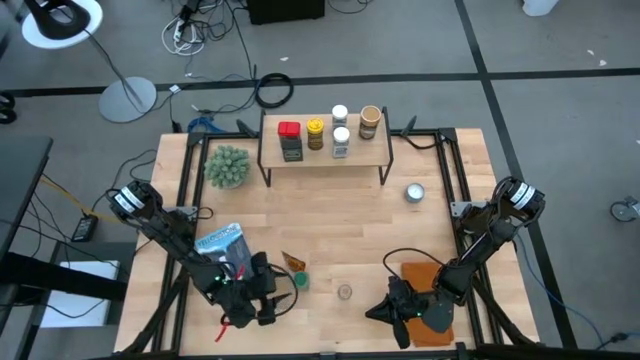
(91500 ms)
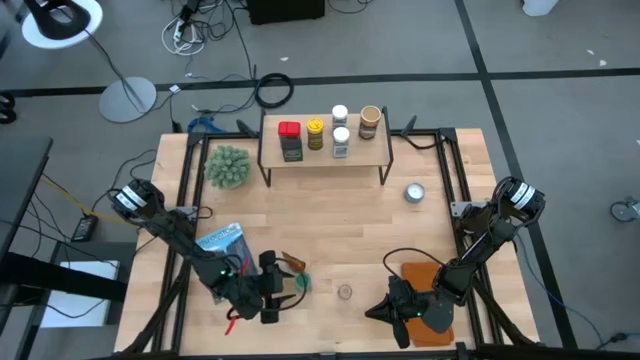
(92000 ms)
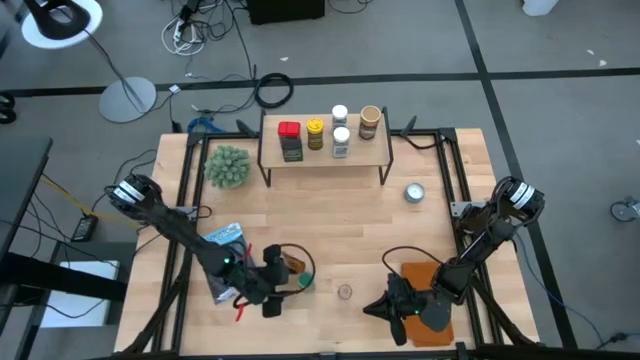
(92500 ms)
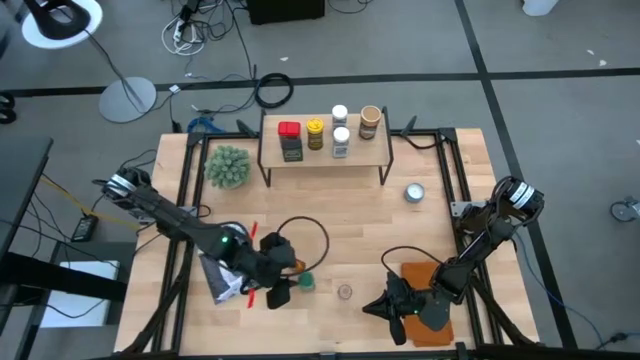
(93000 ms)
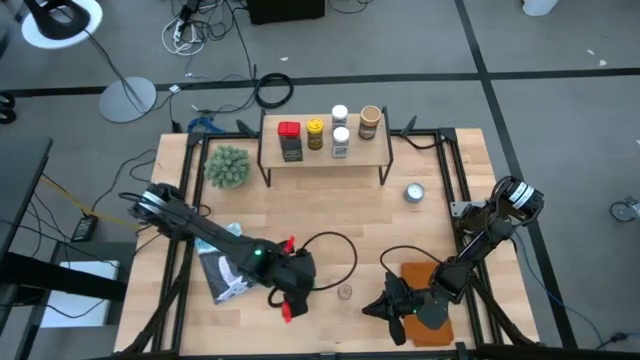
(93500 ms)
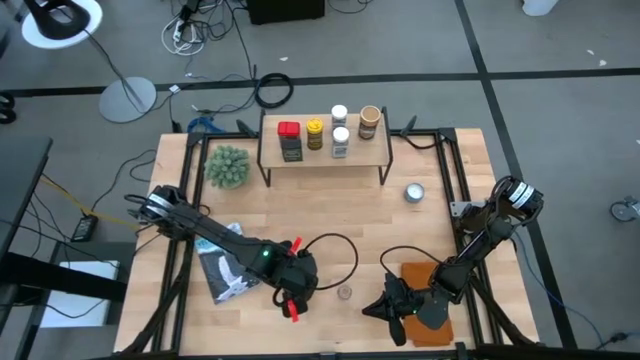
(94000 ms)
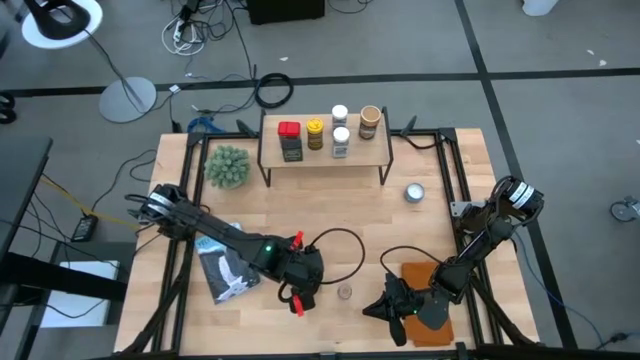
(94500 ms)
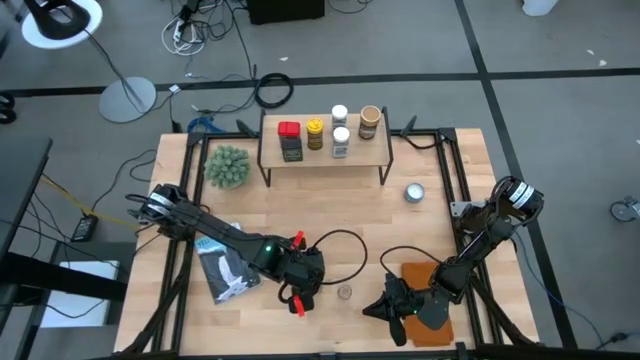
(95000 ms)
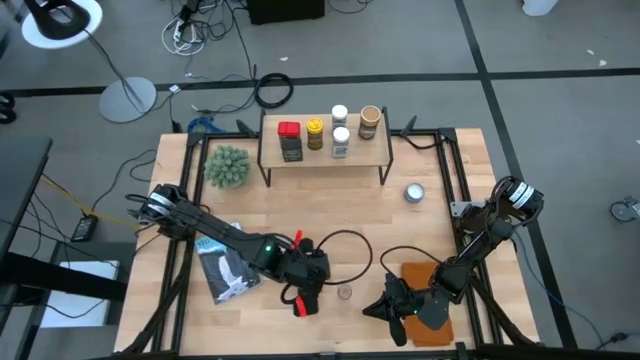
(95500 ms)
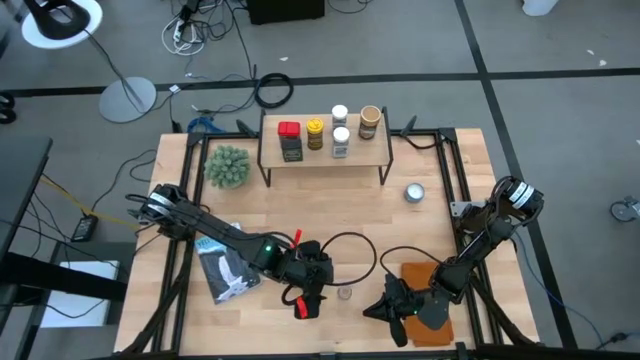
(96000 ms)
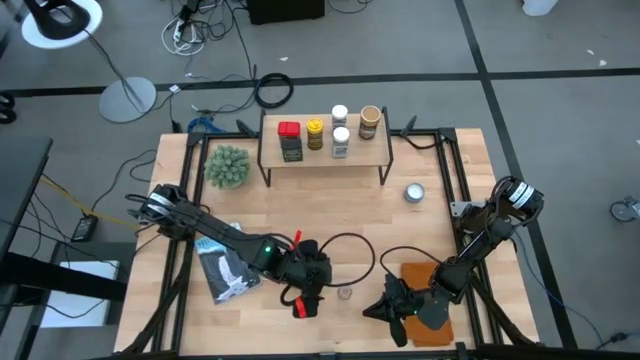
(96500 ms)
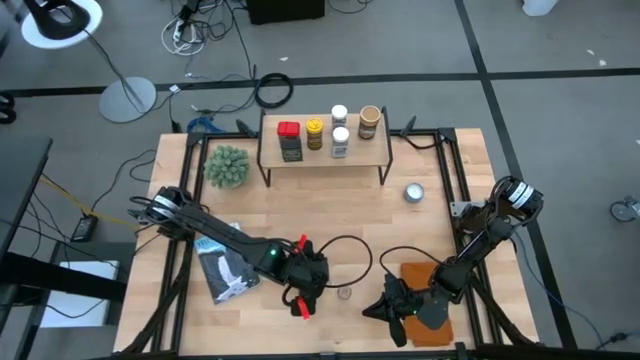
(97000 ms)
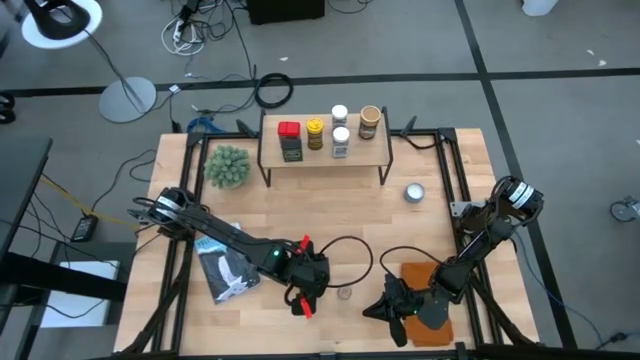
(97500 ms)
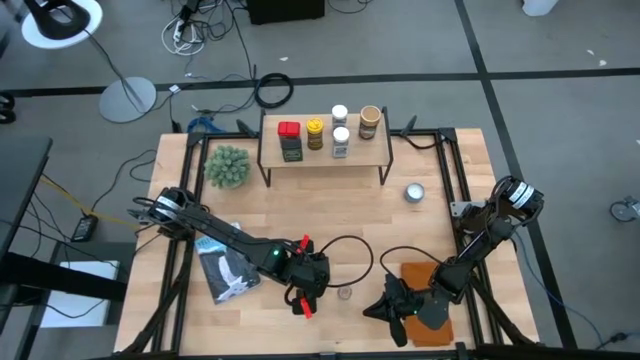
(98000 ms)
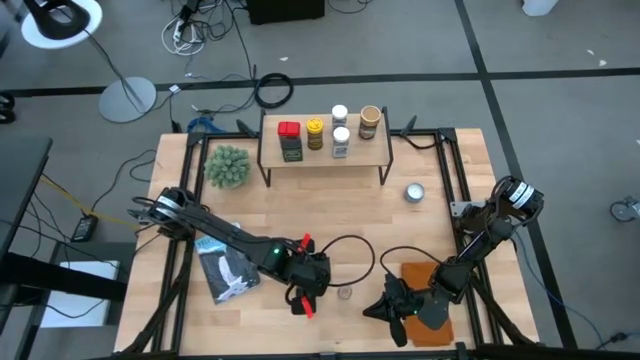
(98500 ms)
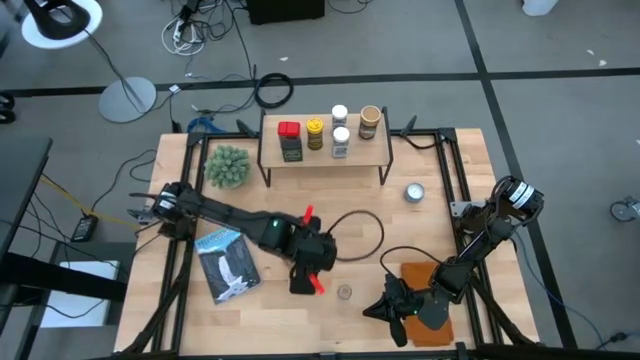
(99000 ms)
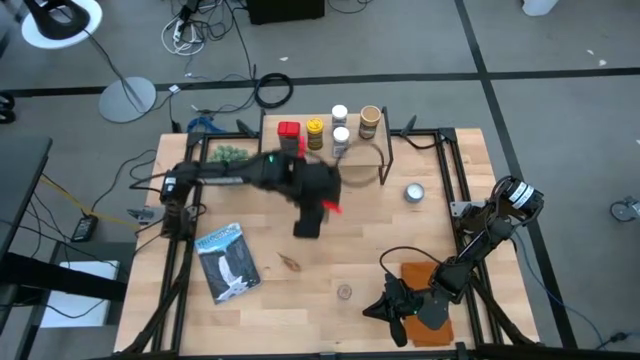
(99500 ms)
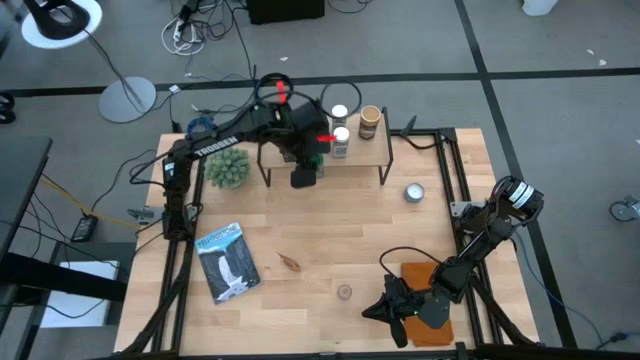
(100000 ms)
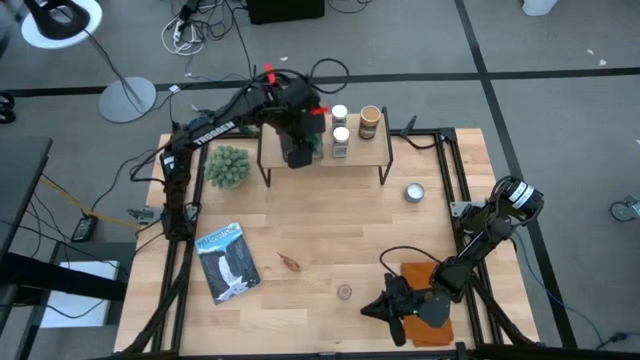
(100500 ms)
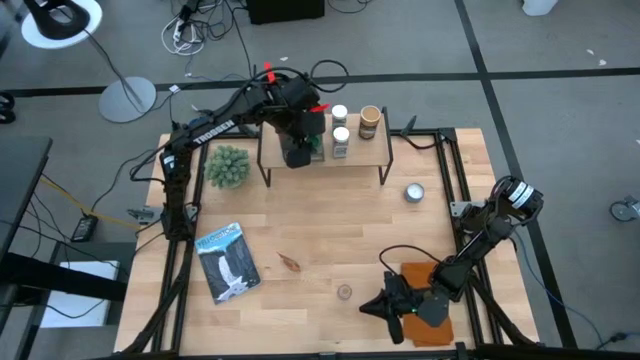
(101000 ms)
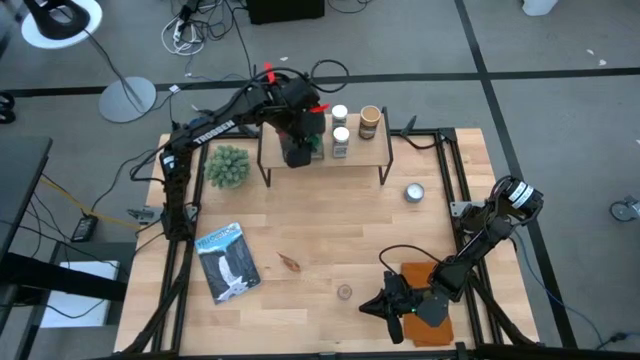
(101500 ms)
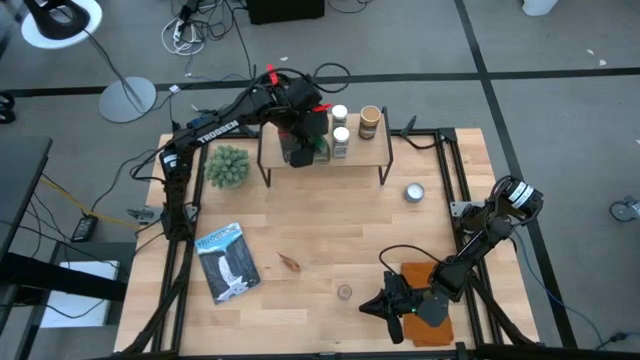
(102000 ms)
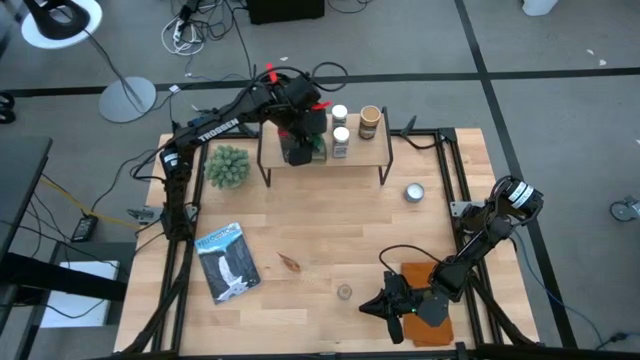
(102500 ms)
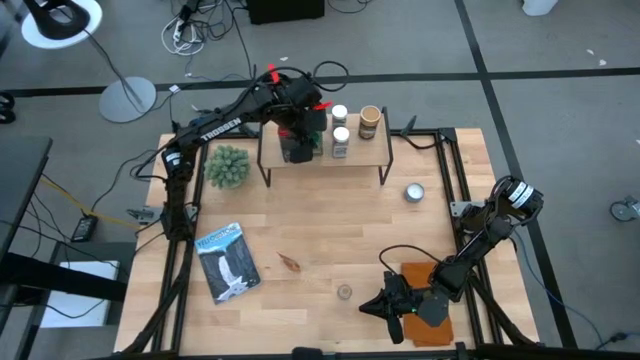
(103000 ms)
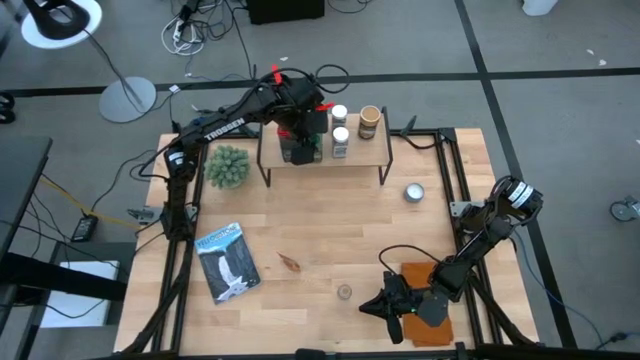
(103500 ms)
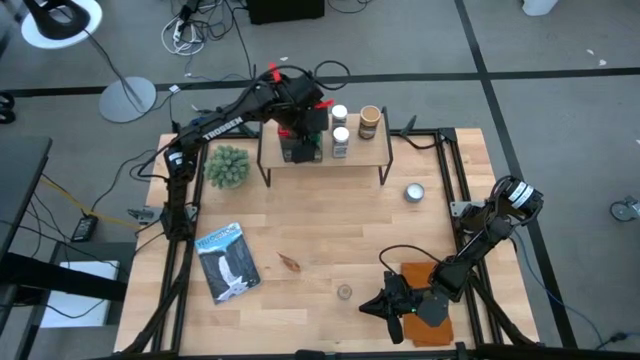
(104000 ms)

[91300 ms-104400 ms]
Task: Shelf spices
Put the green seasoning bottle on the shelf

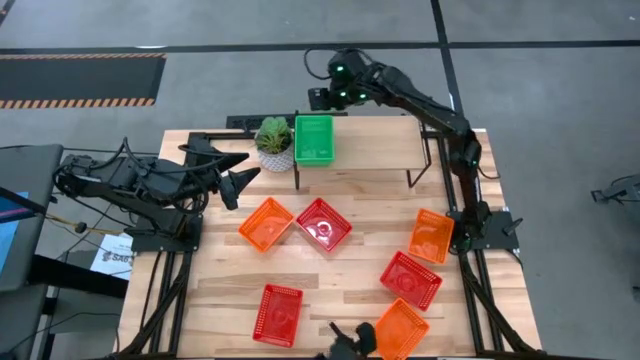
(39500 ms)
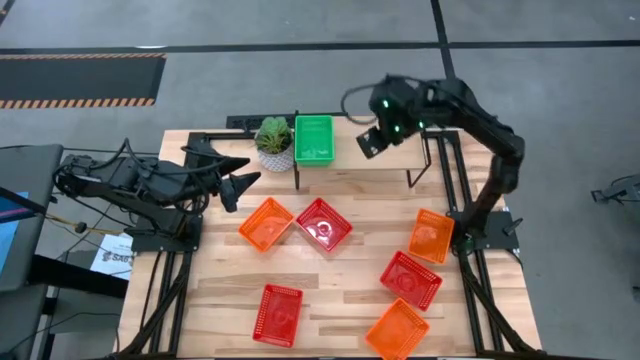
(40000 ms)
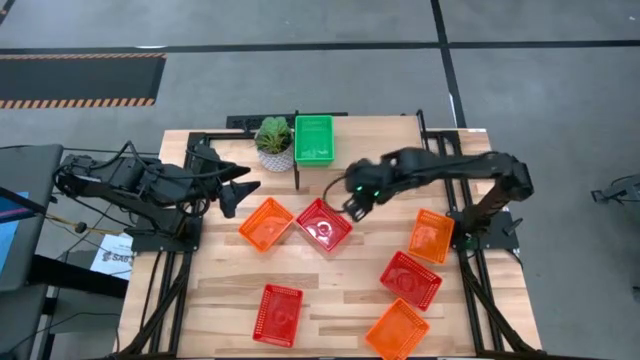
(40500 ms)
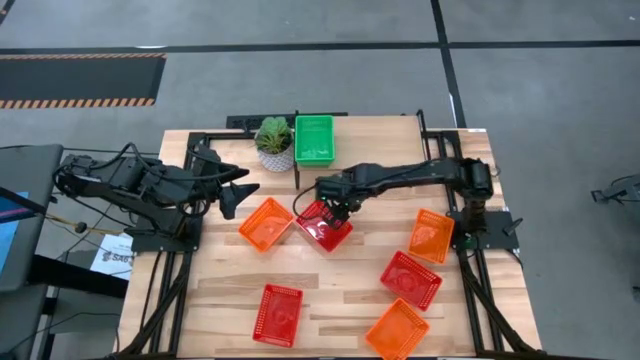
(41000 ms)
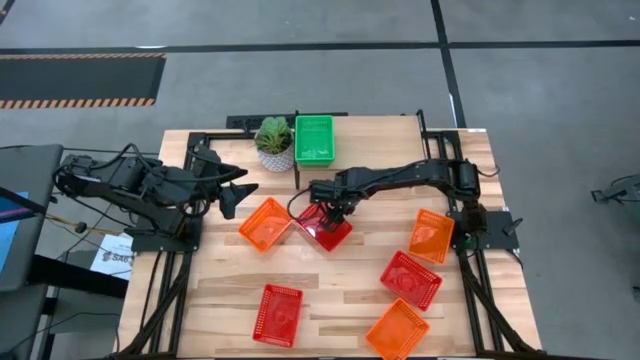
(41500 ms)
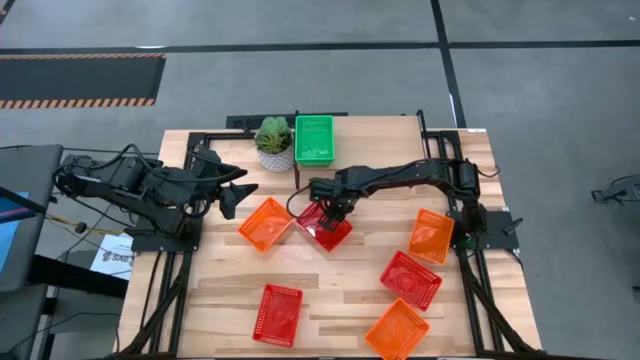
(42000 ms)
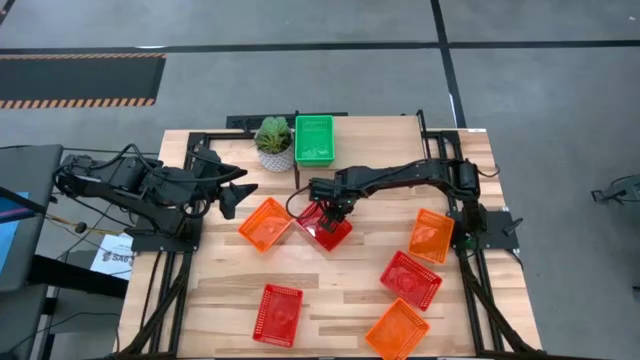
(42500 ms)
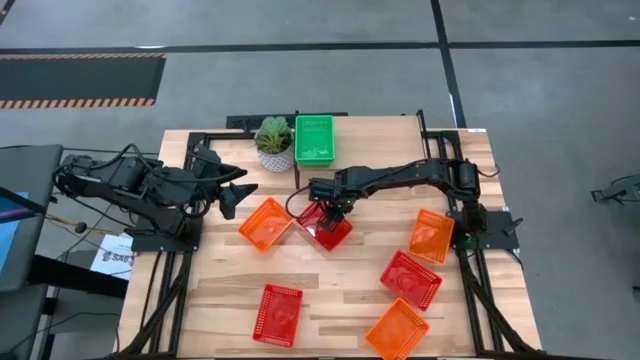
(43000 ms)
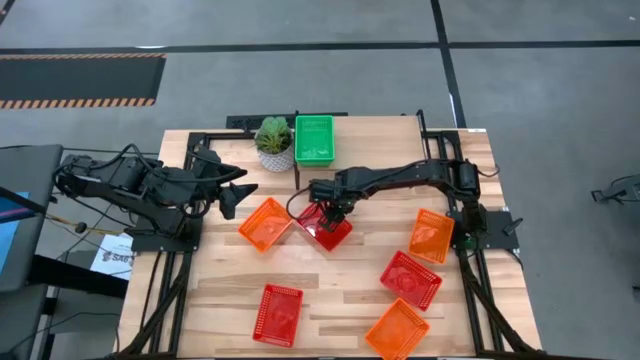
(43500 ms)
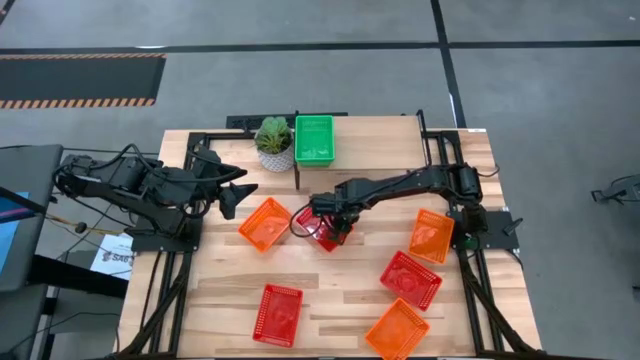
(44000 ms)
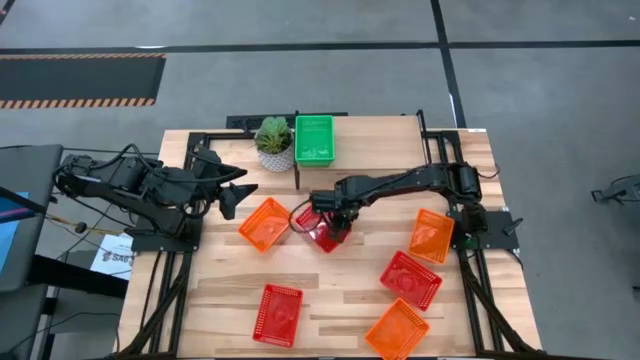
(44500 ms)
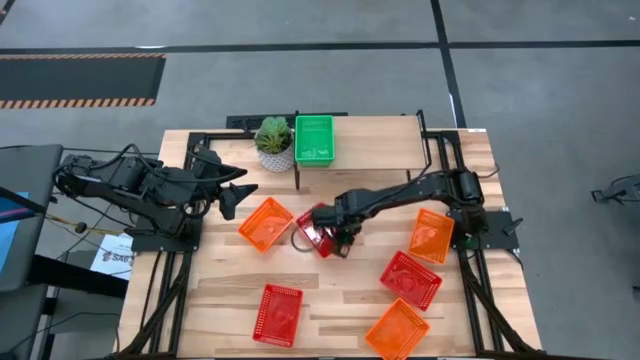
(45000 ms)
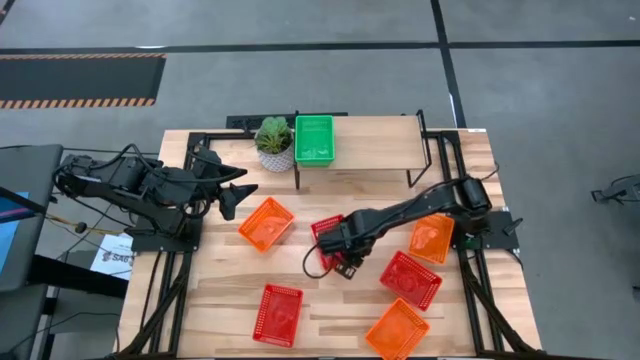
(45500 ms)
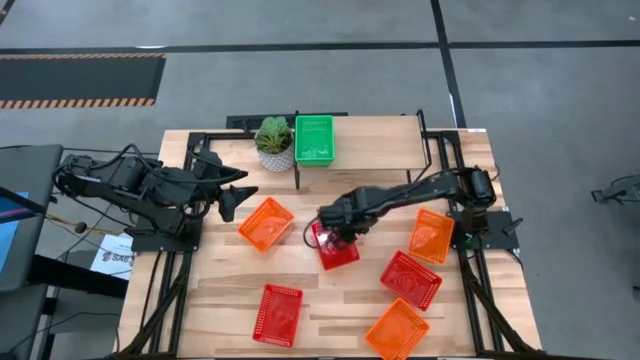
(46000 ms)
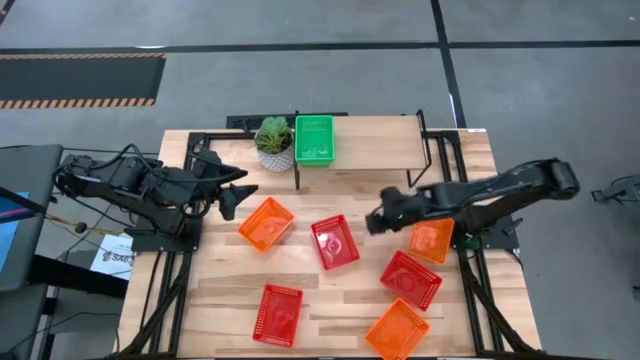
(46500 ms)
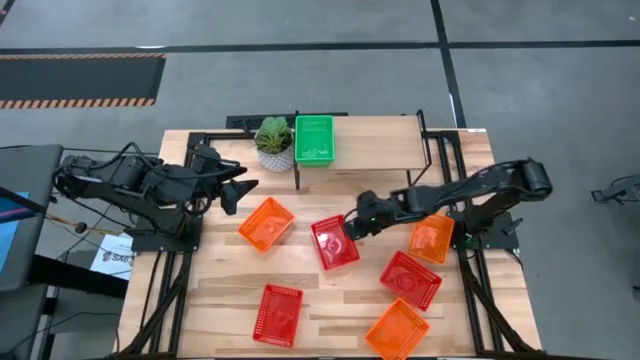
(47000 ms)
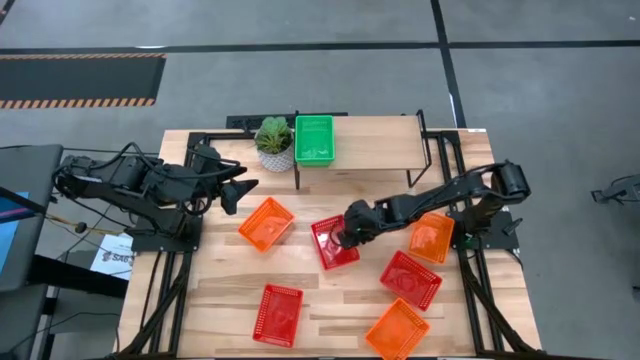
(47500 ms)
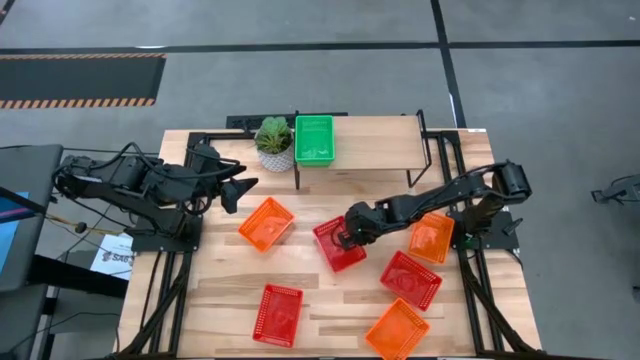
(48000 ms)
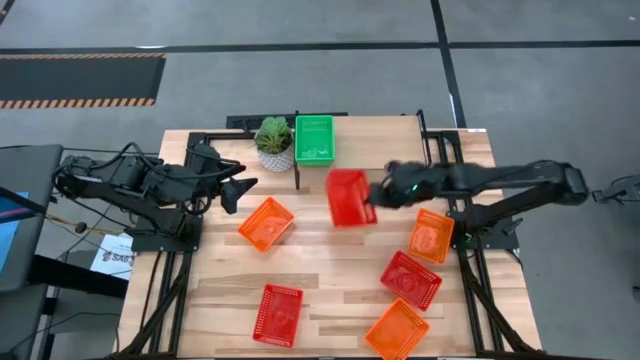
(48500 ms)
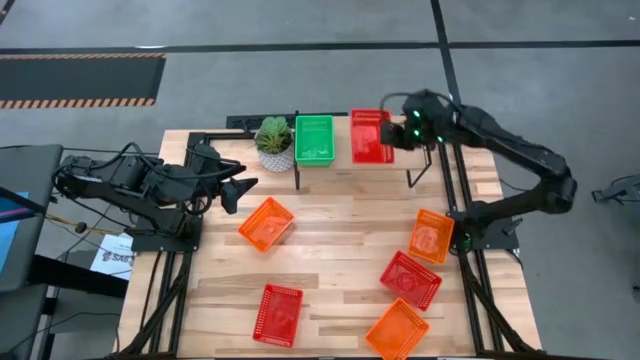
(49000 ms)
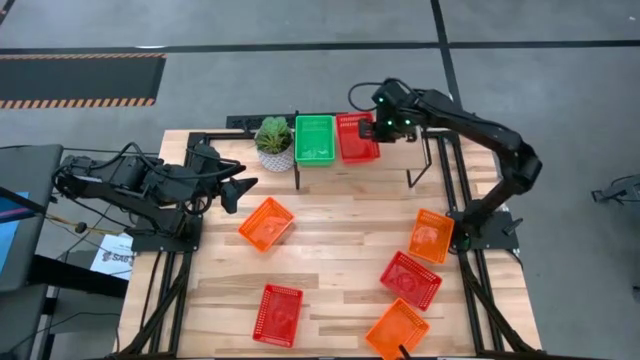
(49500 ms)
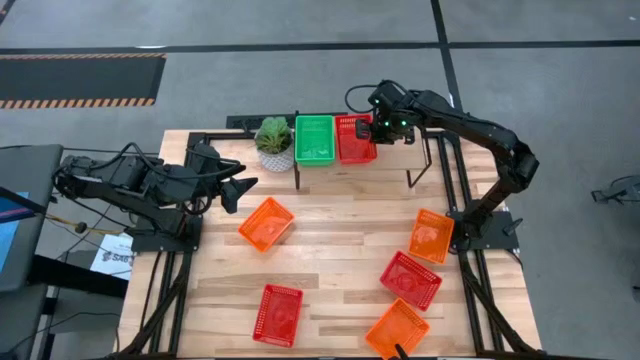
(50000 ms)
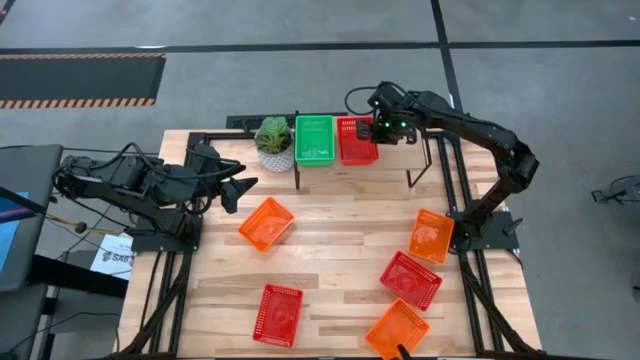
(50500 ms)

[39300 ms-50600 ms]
Task: Stack baskets on shelf by color
Put the top red bin on the shelf
